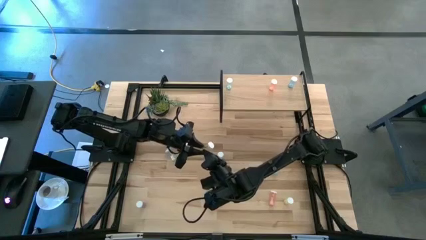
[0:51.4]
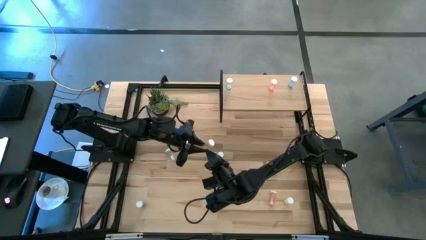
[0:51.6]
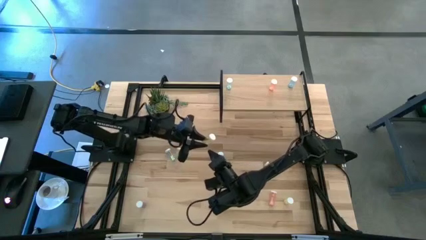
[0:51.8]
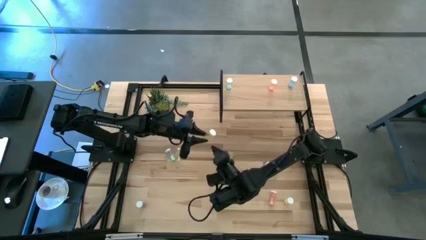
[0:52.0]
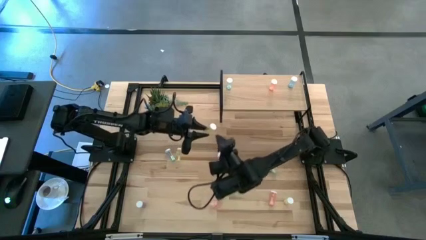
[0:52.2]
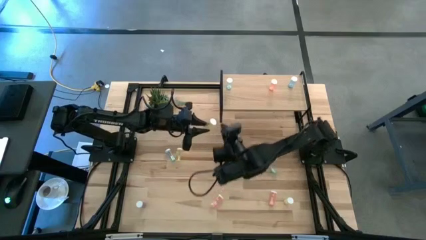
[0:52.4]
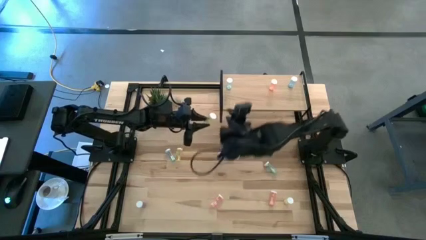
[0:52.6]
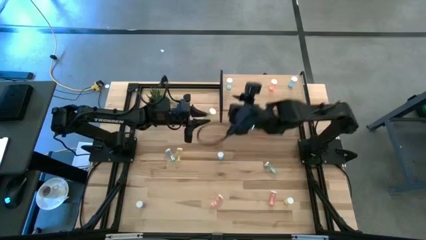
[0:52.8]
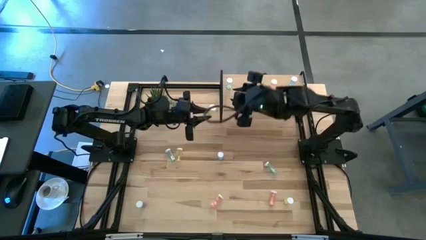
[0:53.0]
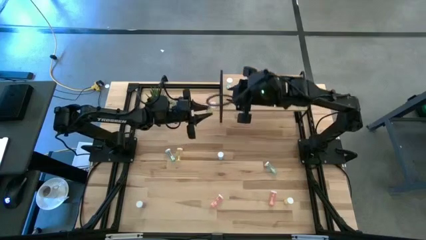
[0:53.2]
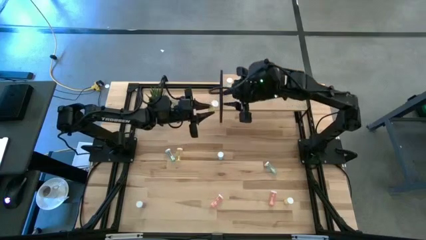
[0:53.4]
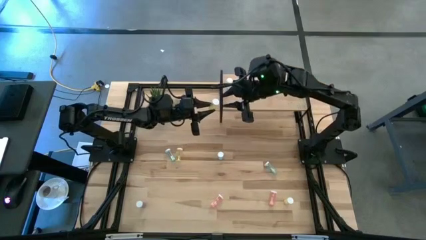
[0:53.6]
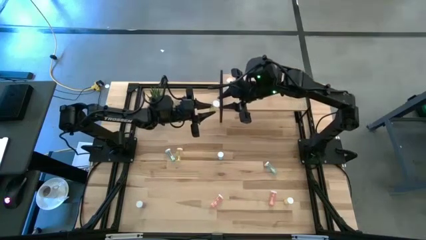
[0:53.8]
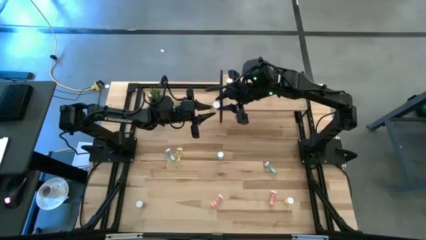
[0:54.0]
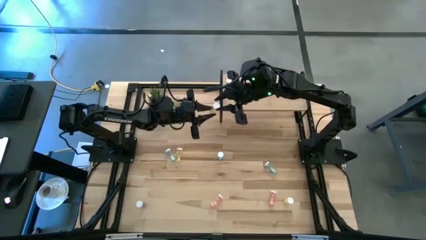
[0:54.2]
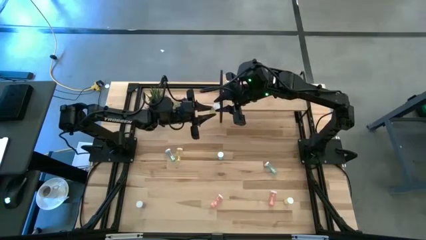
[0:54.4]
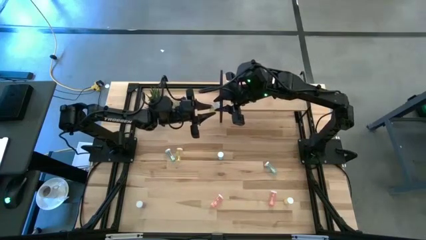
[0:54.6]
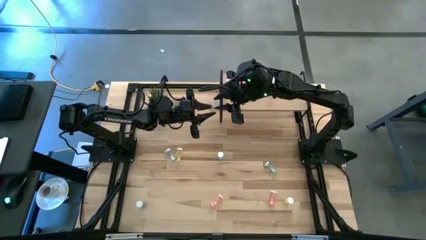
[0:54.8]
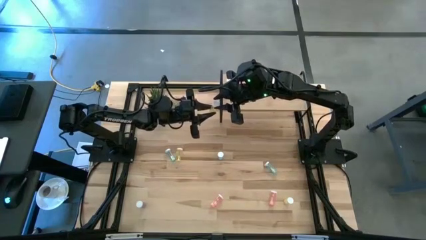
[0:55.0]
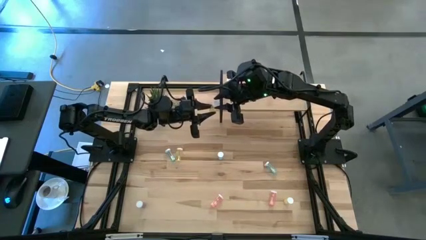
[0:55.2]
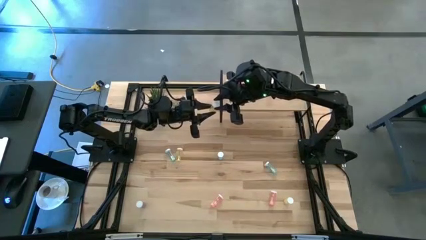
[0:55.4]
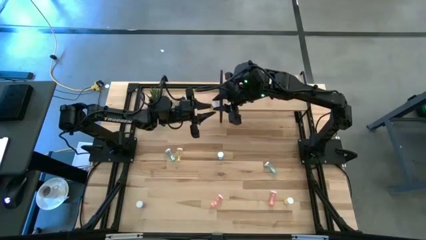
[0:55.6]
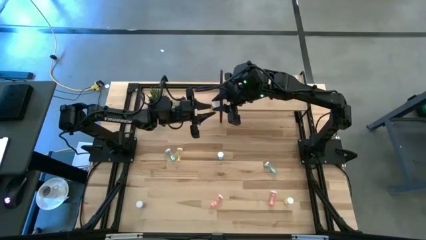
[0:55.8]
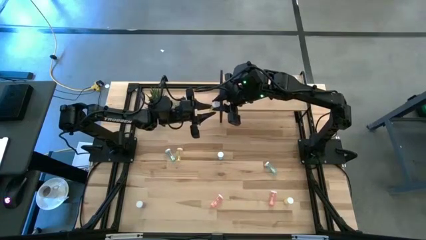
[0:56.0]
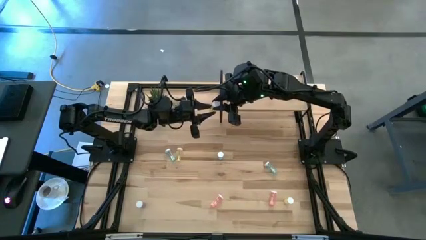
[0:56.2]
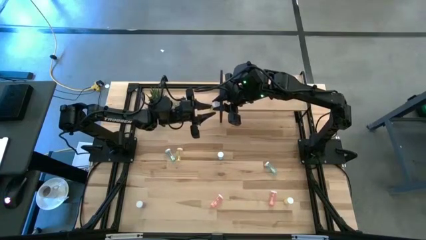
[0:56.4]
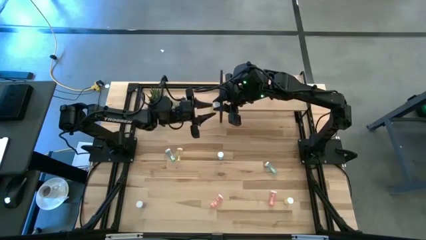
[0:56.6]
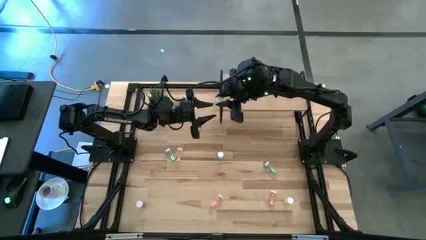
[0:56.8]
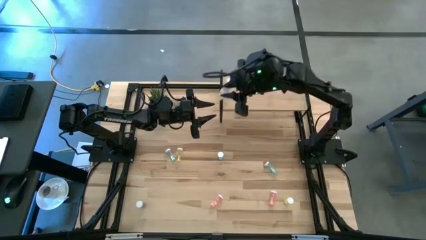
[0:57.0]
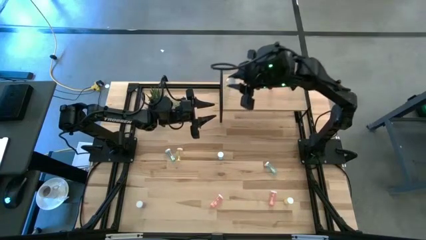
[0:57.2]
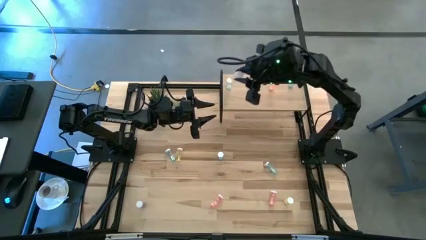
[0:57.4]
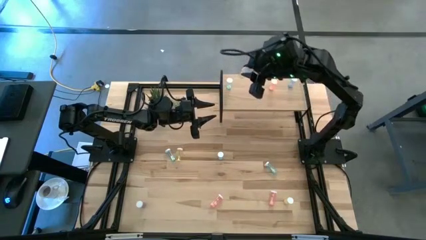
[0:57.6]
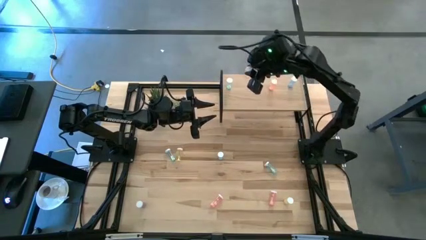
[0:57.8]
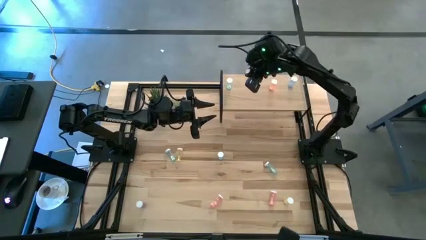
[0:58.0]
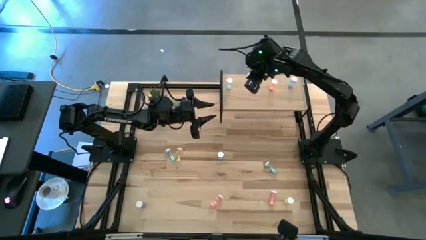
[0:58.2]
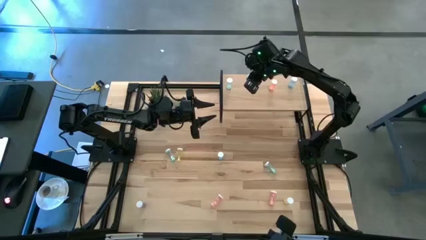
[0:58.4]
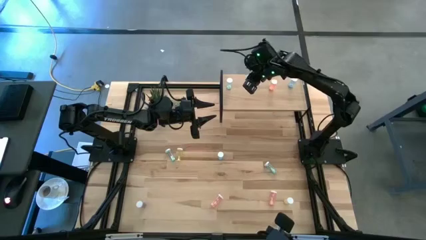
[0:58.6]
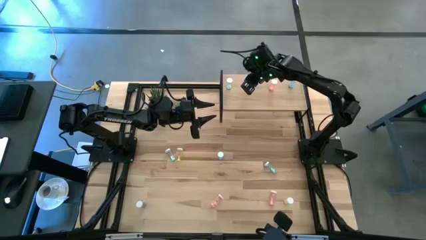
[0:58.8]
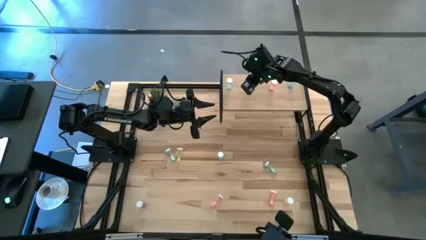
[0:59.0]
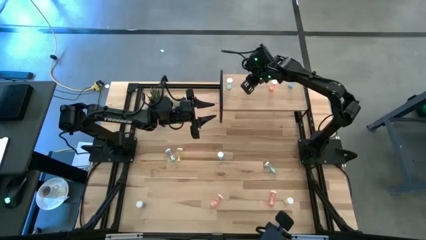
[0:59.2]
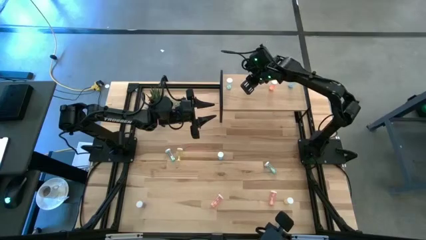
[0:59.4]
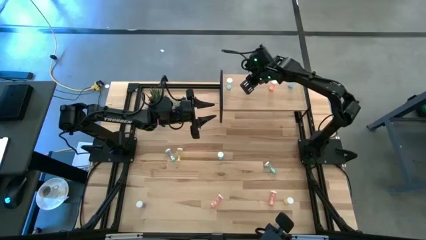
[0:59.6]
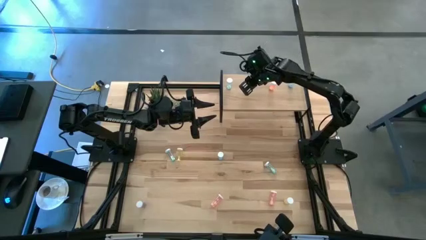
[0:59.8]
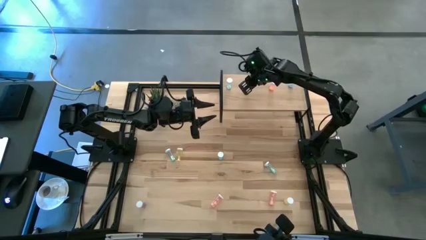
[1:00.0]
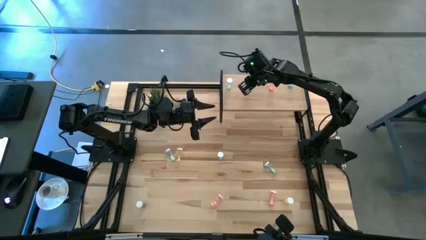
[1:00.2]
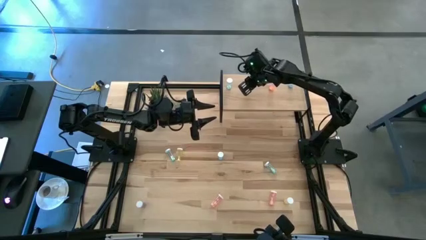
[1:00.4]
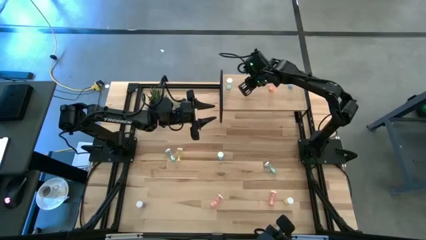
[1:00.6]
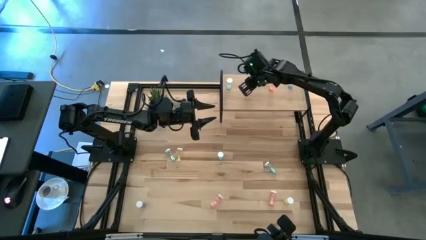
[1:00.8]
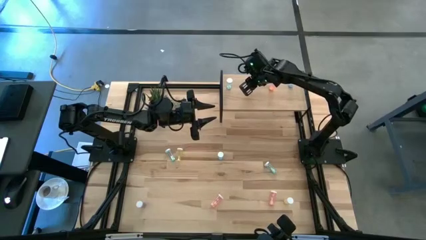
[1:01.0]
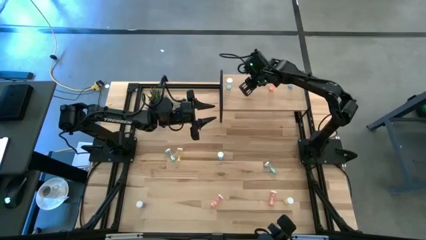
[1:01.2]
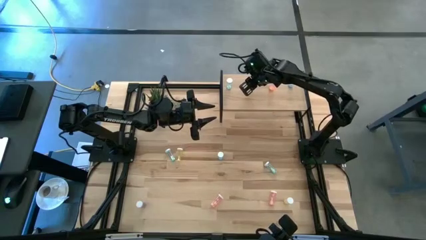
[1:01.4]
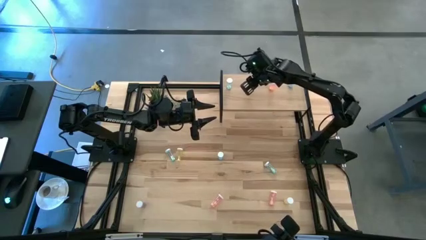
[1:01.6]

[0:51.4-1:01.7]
Task: Pick and place medicine bottles onto shelf by color
Put the yellow pill bottle on the shelf

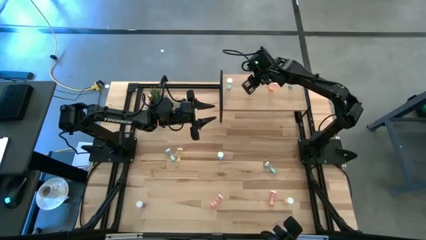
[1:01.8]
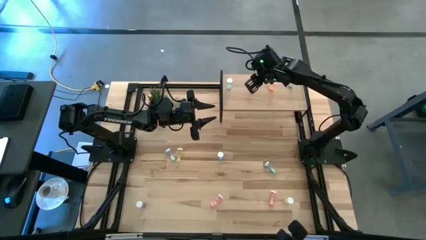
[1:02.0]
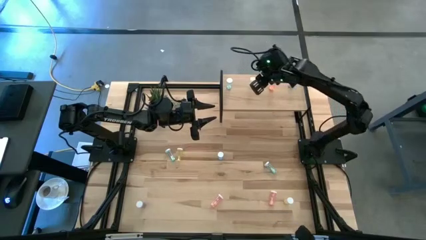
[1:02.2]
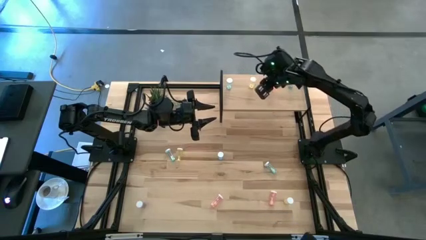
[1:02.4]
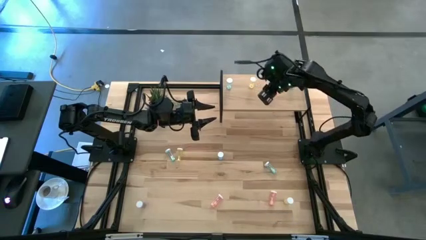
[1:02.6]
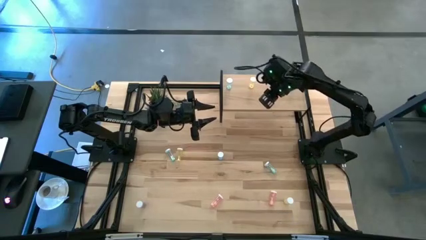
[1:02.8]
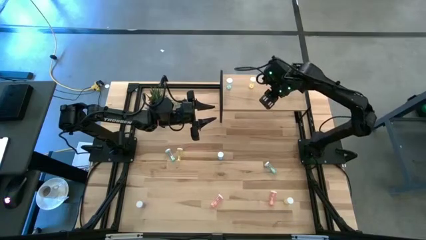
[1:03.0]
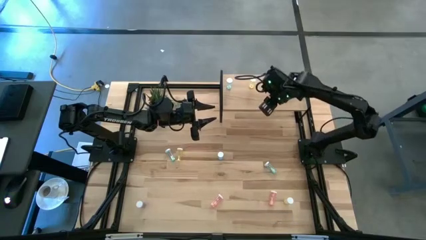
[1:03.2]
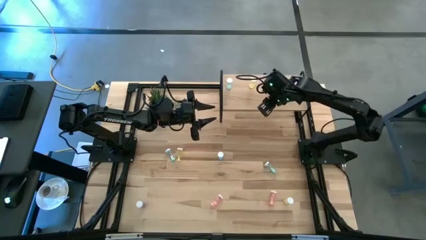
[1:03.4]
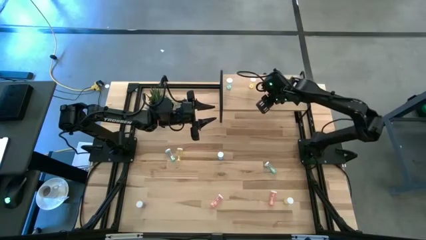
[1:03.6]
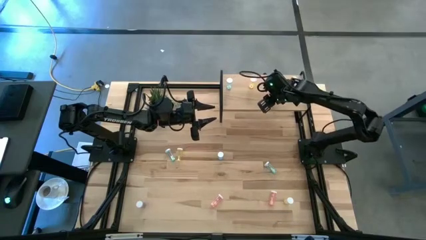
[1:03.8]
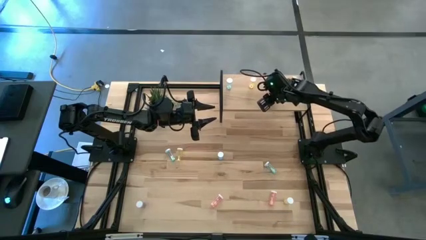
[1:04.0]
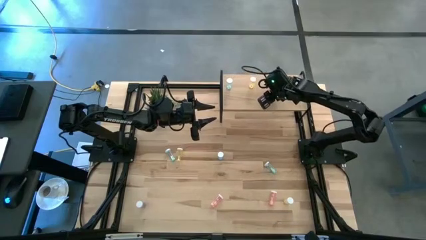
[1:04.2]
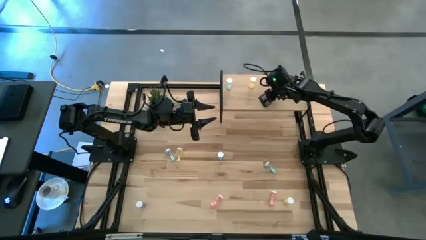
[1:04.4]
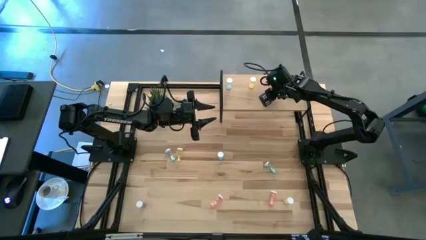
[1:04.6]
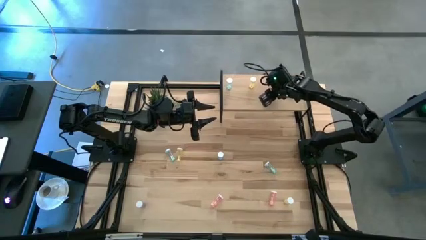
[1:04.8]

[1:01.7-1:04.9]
Adjust the pink bottle on the shelf
